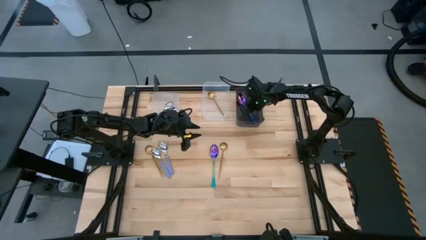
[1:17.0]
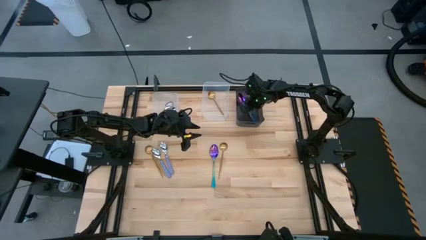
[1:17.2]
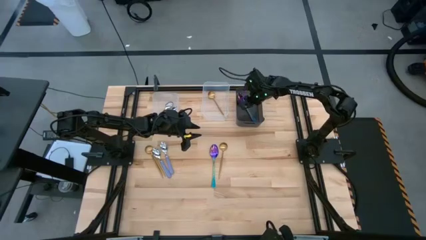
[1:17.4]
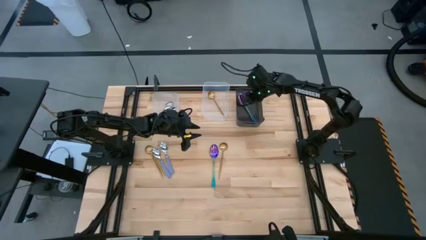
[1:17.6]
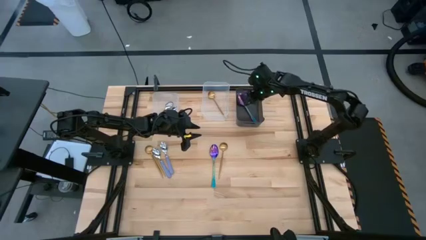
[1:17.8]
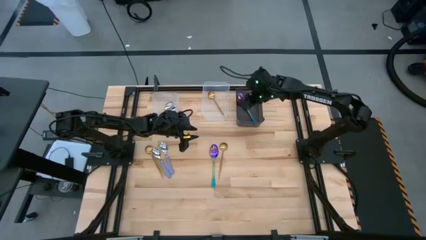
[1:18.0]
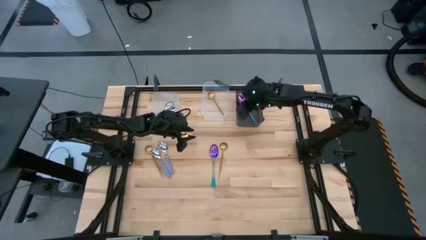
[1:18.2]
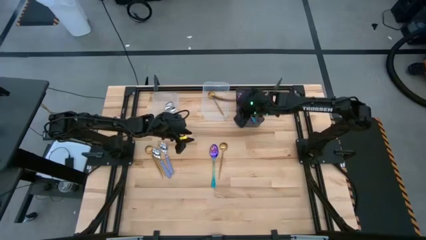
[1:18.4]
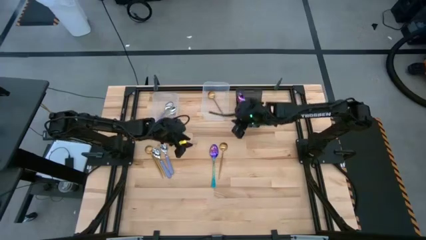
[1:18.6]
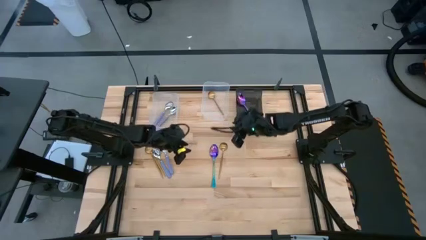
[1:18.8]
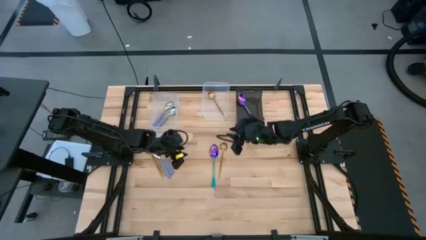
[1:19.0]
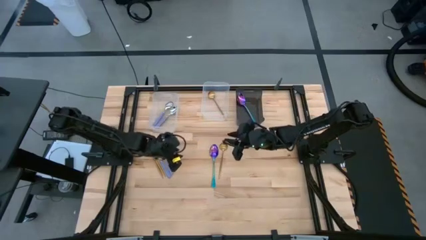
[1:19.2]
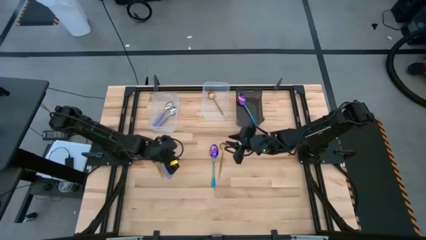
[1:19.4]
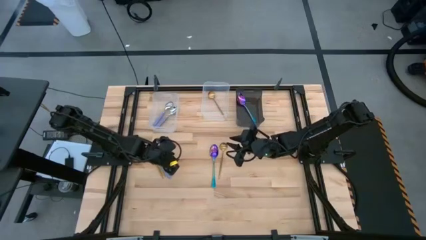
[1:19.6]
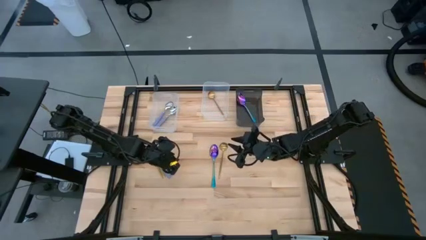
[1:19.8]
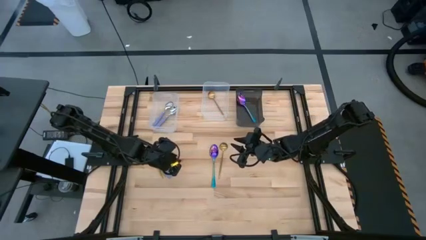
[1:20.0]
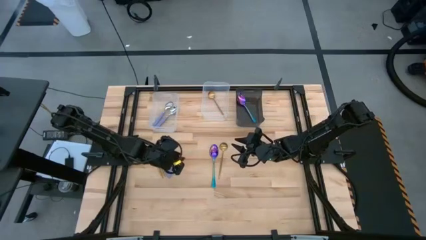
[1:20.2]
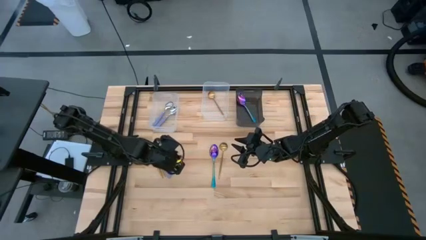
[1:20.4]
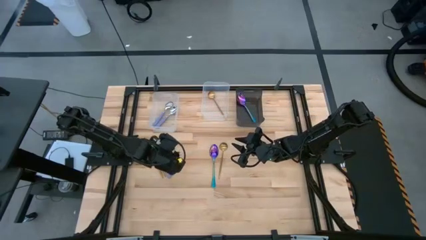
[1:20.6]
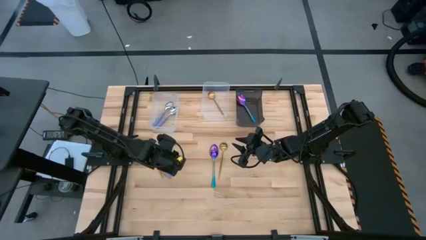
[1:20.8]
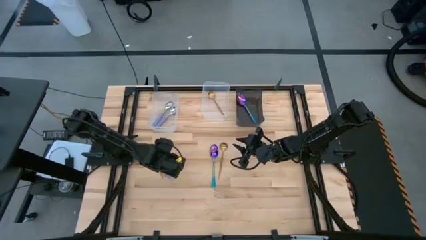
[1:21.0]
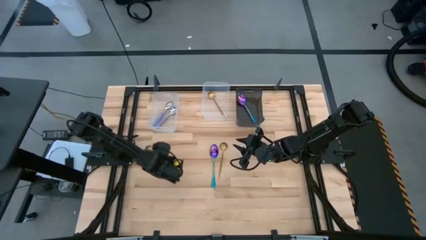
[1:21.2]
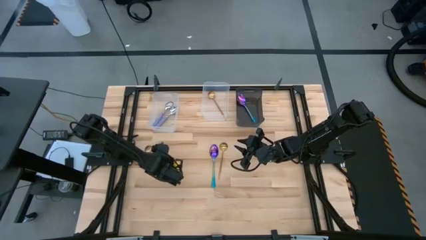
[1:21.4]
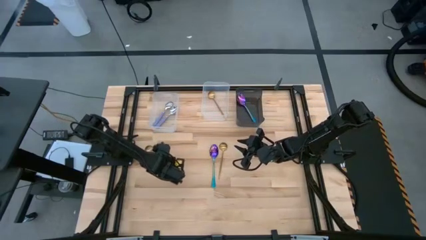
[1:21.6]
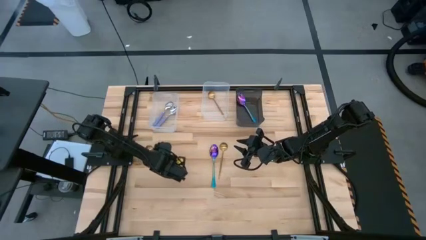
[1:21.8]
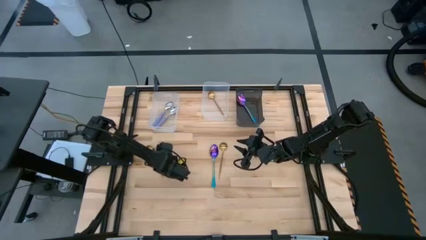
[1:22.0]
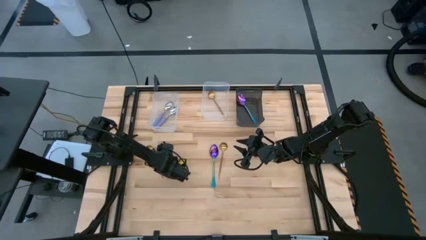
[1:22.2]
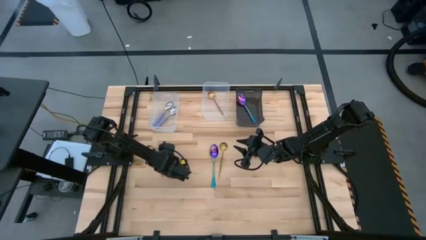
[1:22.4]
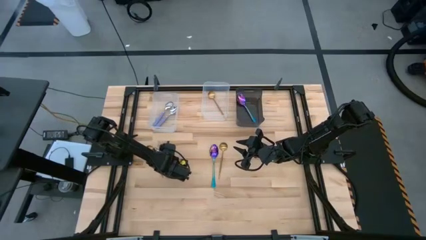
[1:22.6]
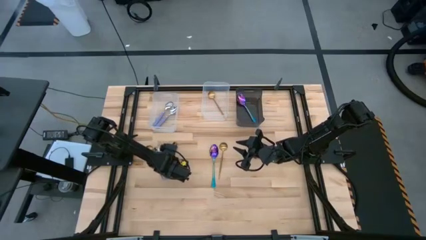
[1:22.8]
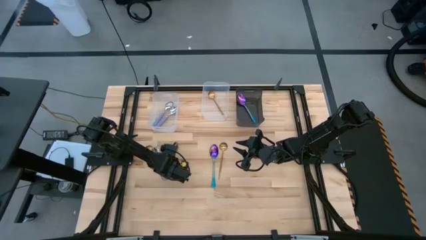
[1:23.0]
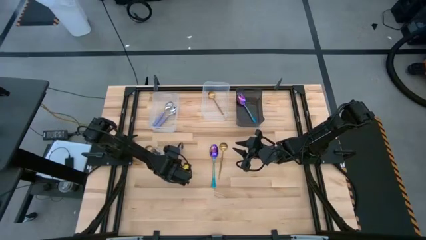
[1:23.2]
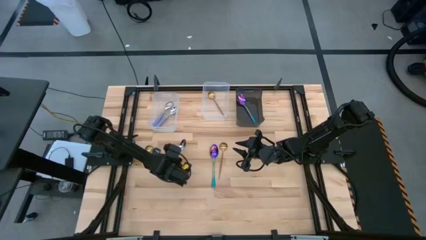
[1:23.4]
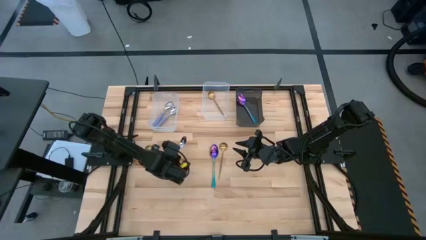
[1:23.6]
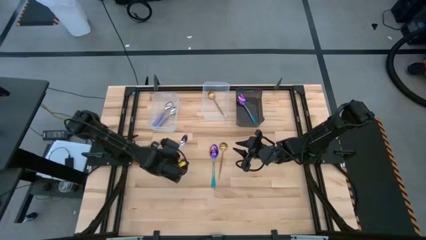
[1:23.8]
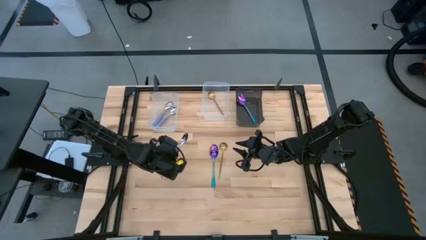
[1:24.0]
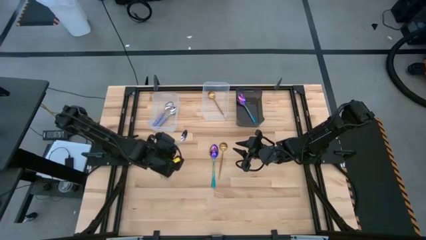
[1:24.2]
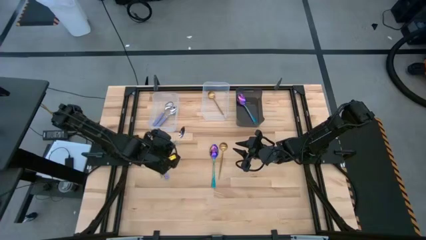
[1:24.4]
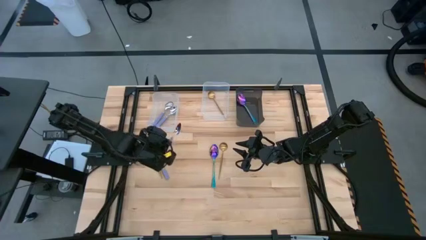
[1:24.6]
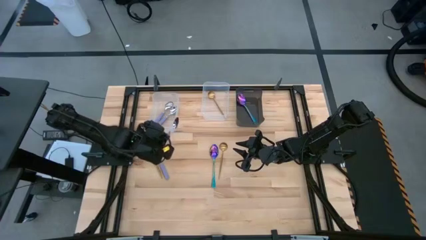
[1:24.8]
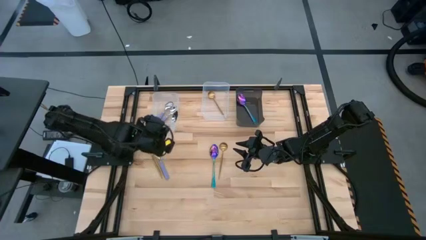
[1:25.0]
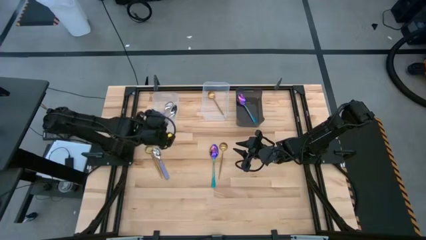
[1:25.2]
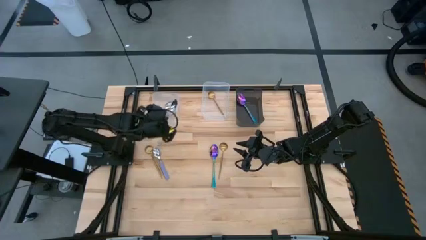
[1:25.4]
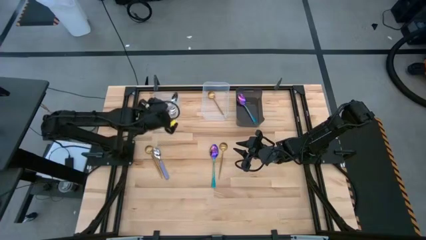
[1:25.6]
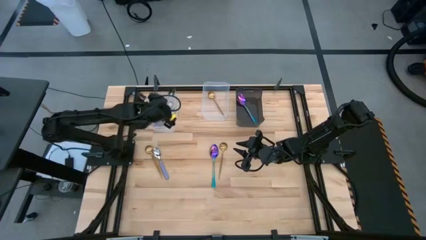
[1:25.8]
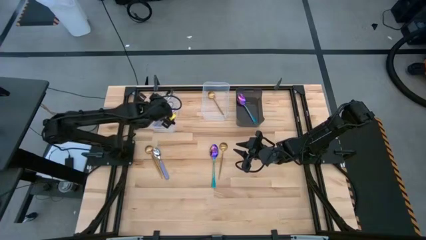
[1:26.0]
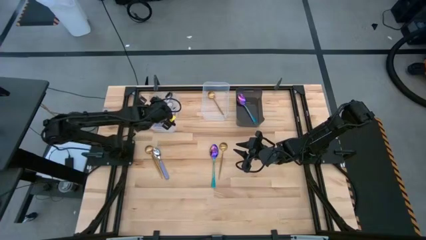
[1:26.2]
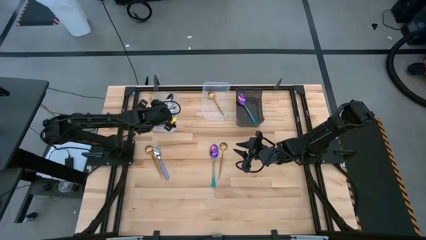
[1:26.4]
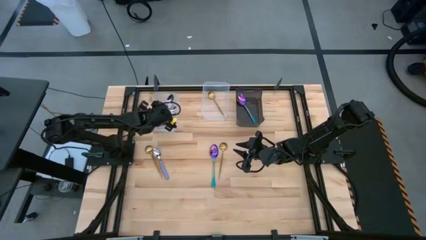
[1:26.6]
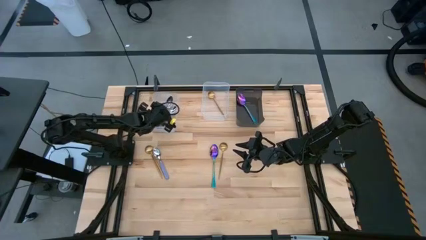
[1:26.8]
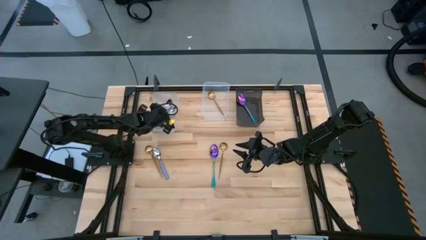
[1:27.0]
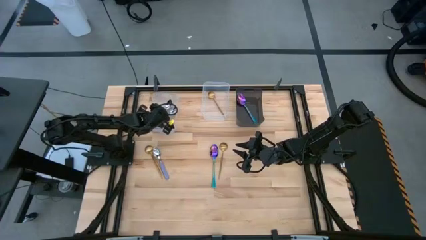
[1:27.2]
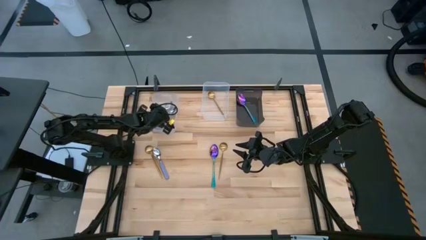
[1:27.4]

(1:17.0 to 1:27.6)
Task: Sort silverware by color (type)
Put the purple spoon into the left transparent bin
